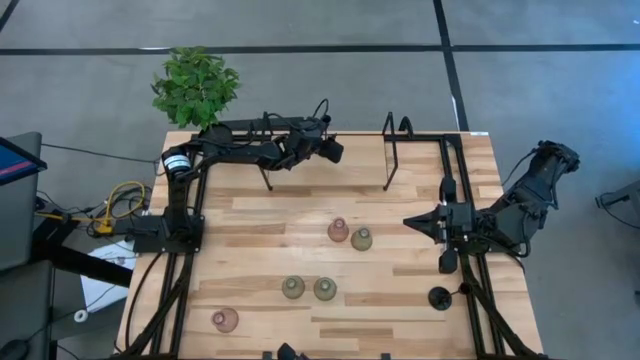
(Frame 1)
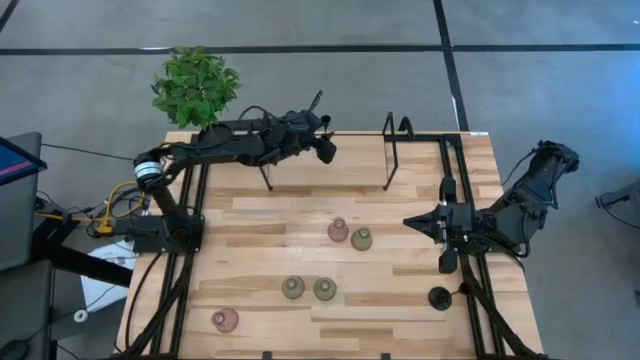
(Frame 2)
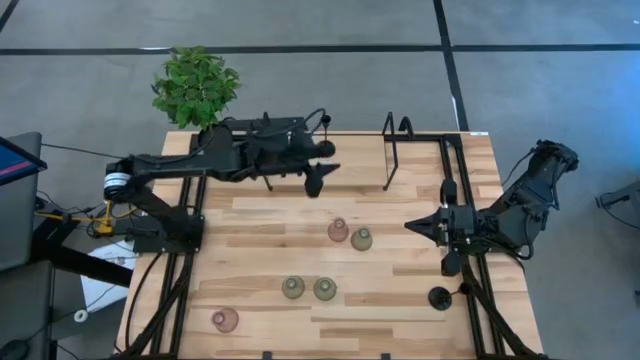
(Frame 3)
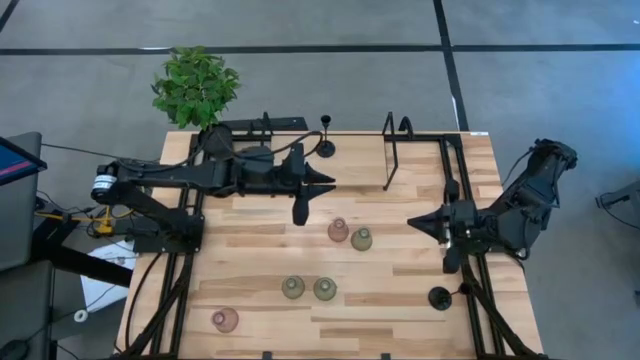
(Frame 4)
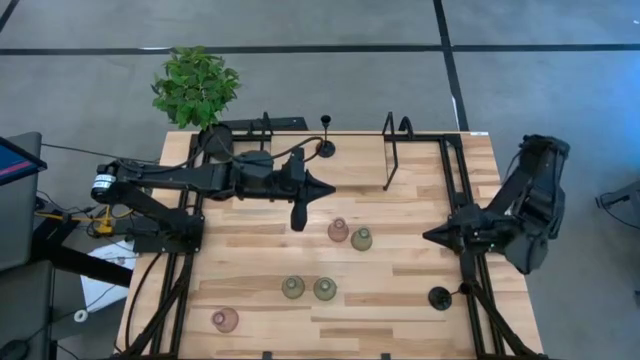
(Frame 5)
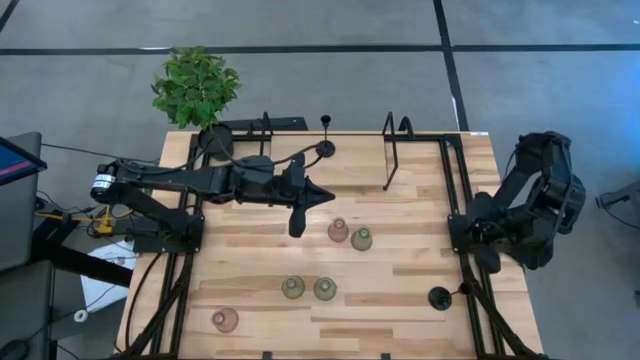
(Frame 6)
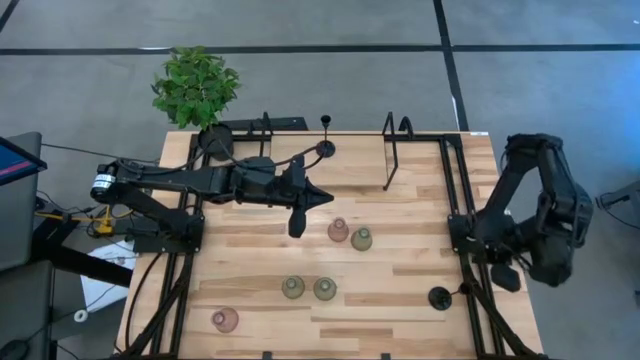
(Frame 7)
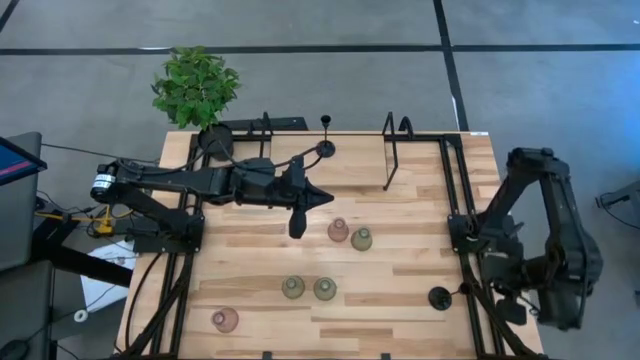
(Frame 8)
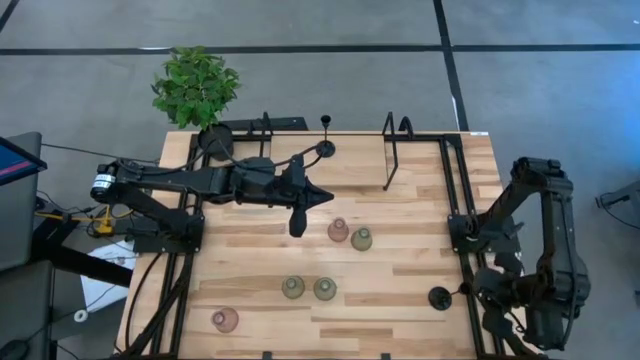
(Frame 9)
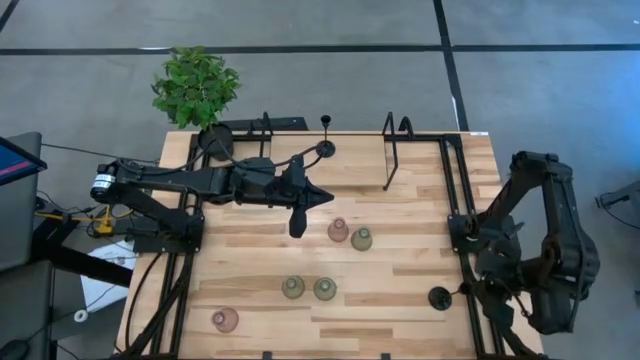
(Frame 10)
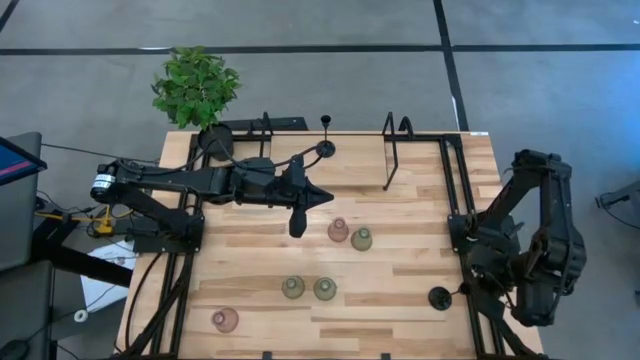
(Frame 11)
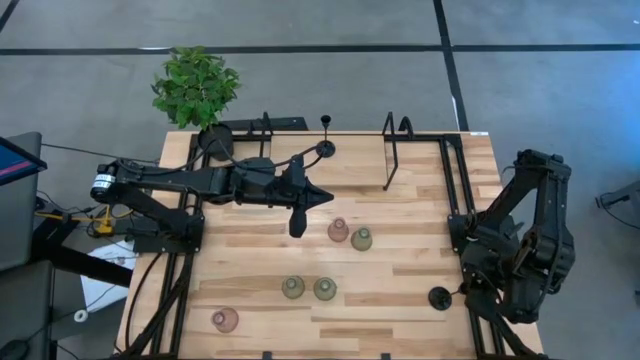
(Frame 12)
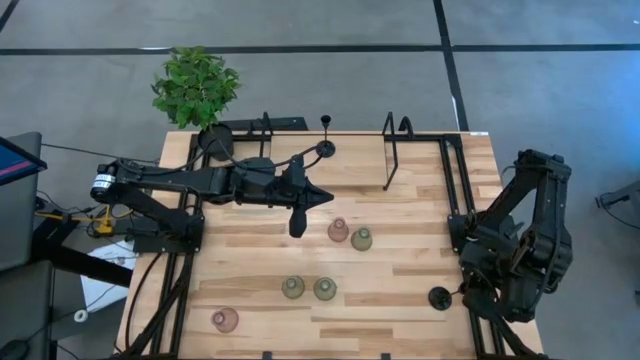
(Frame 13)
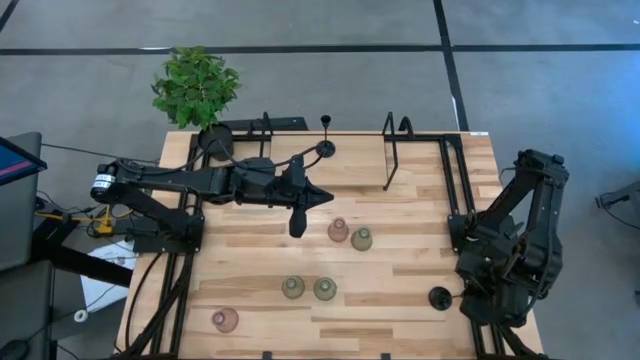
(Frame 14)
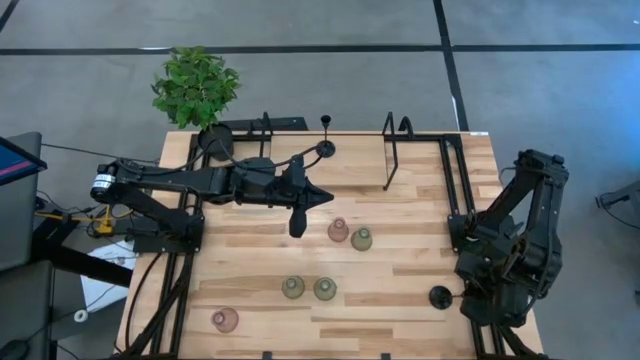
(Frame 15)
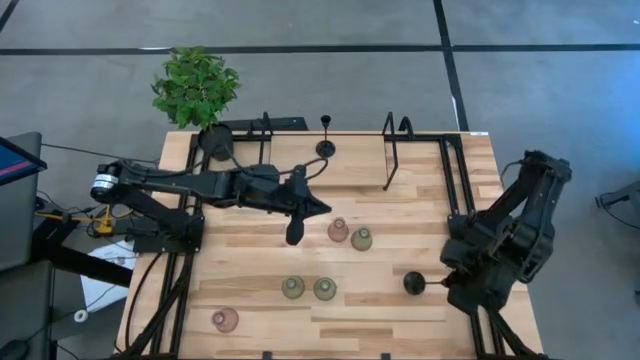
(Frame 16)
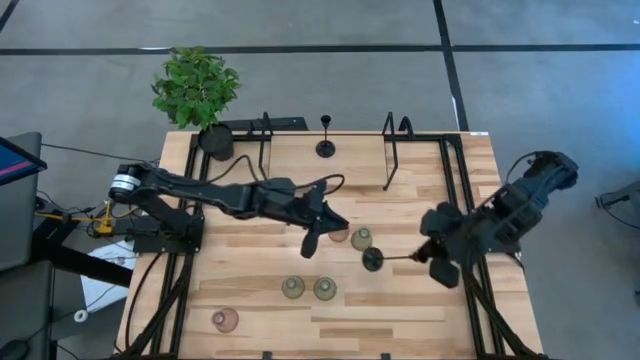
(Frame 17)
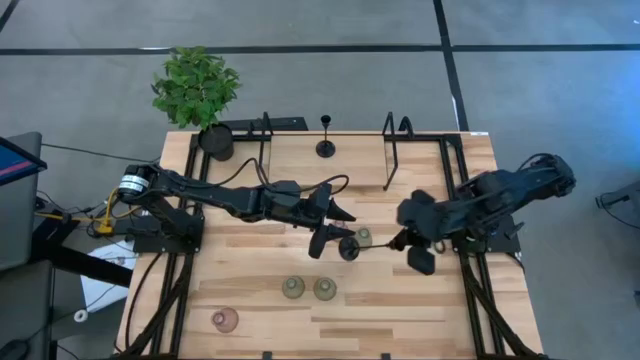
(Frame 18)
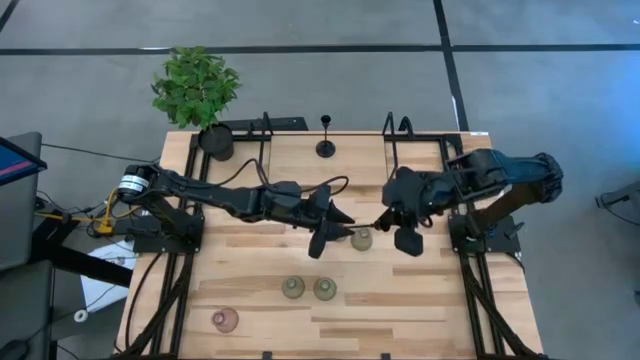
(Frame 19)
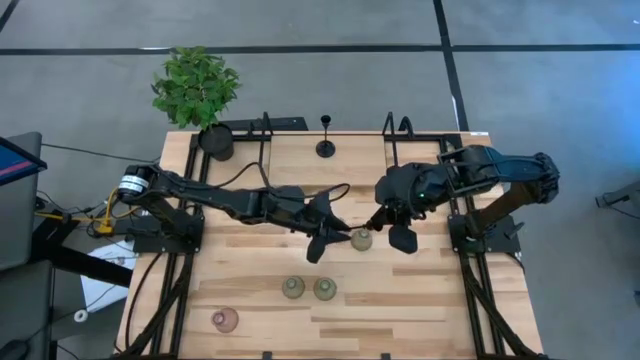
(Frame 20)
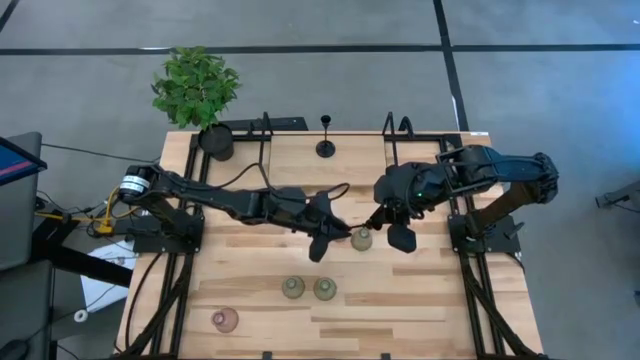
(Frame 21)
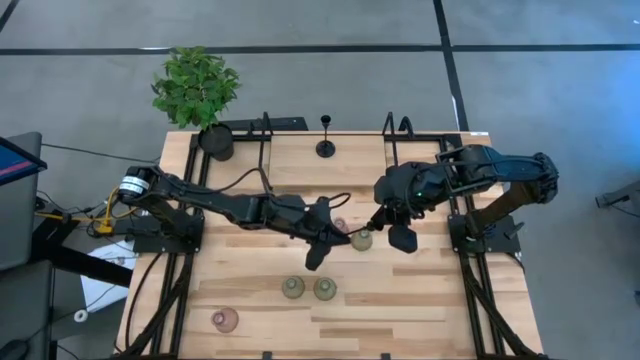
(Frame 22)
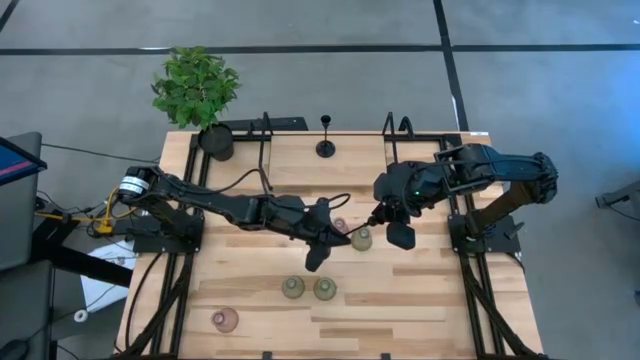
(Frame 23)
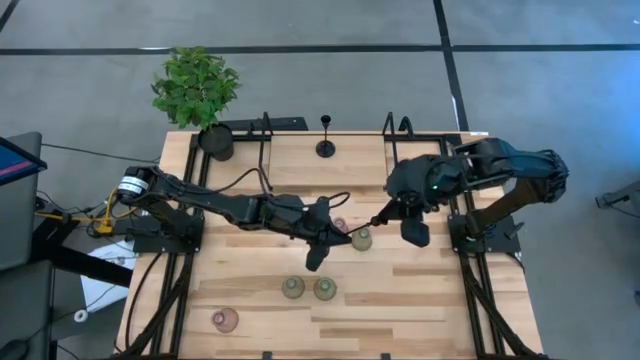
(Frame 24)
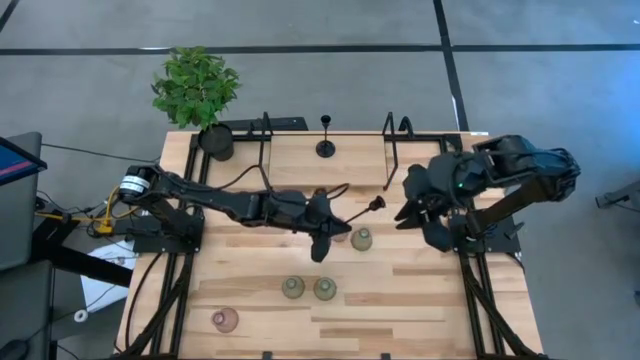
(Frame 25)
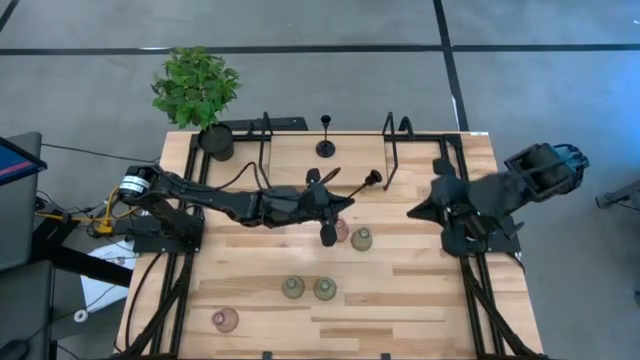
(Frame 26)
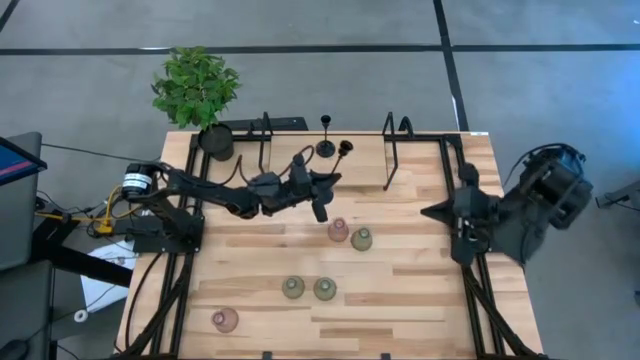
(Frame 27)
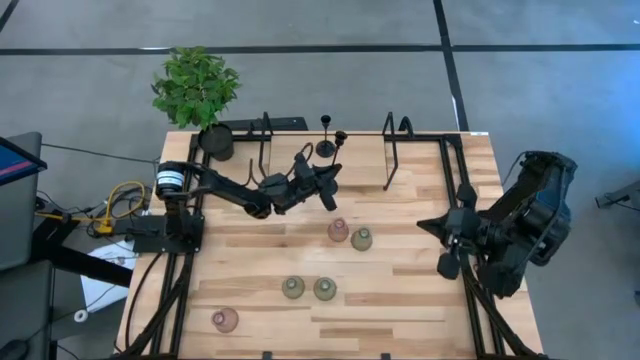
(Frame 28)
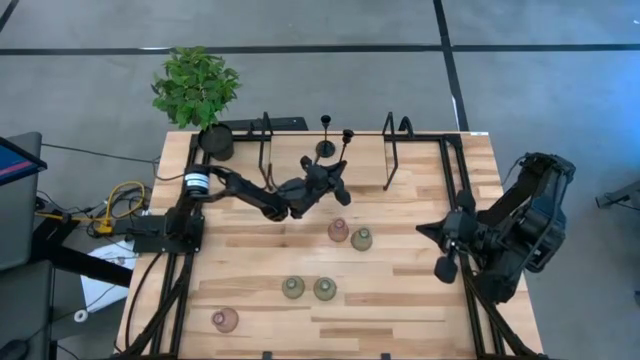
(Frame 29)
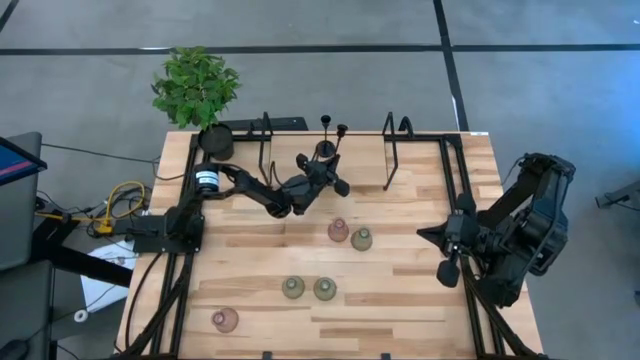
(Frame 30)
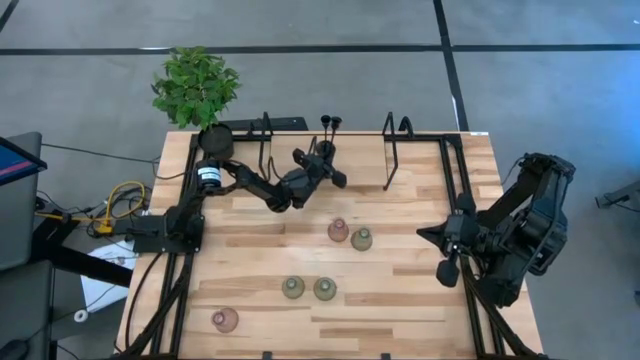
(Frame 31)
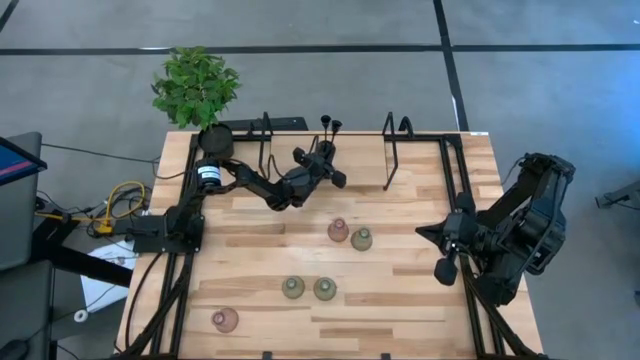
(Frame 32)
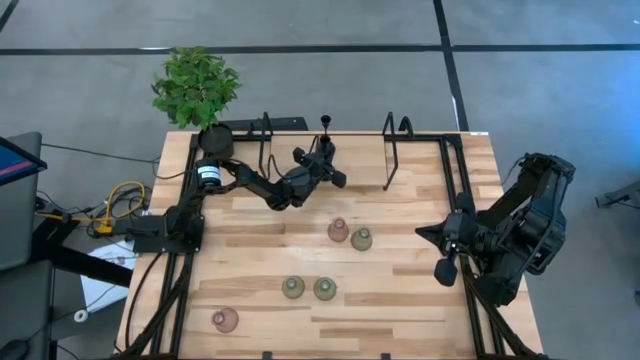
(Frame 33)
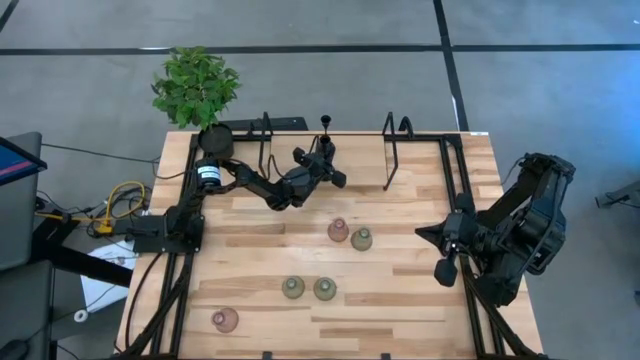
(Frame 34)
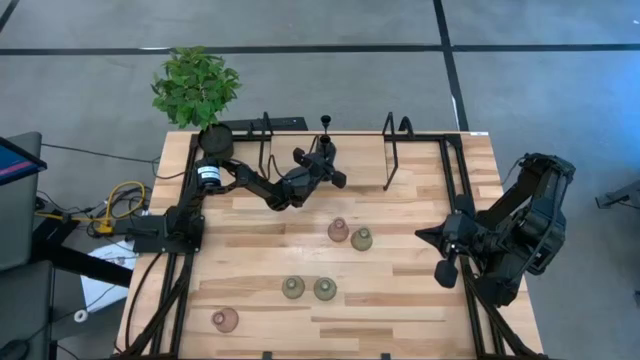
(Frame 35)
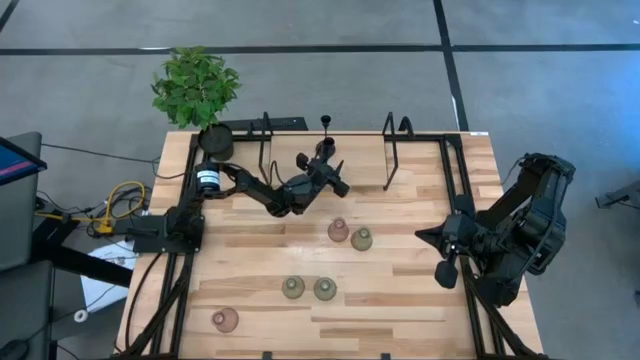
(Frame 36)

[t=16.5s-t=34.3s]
Task: Pick & Place candle stick holders
Put the black candle holder on the shelf aligned with the black candle holder

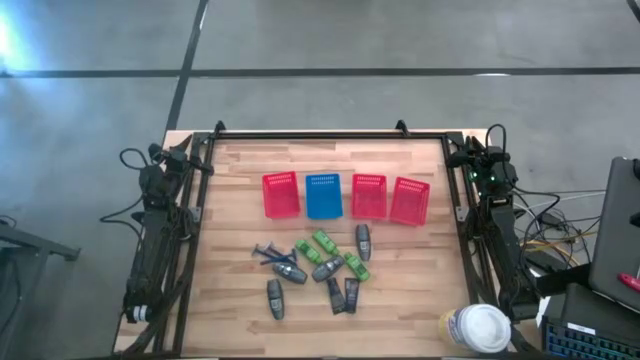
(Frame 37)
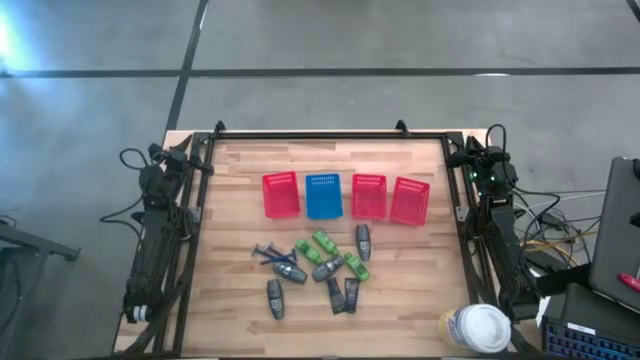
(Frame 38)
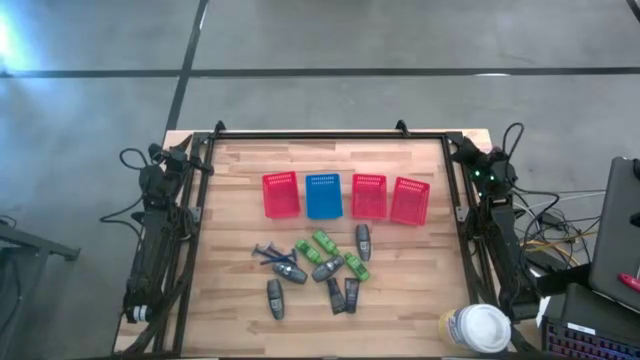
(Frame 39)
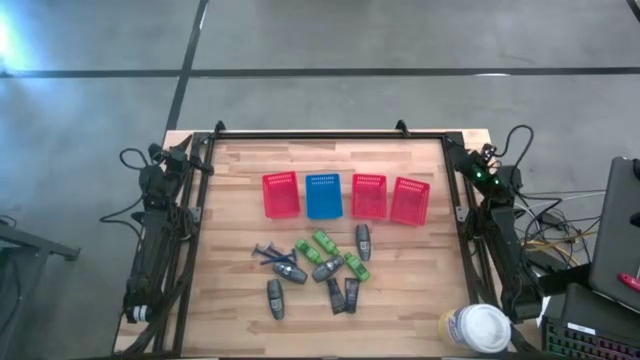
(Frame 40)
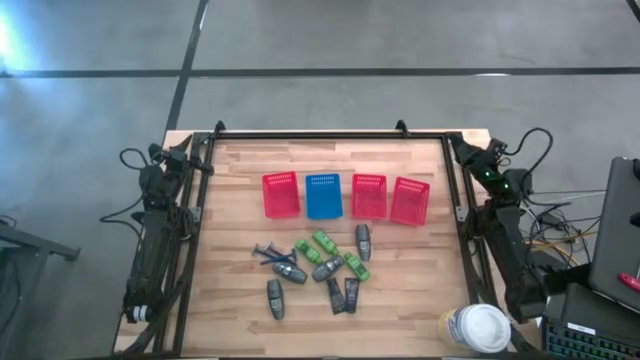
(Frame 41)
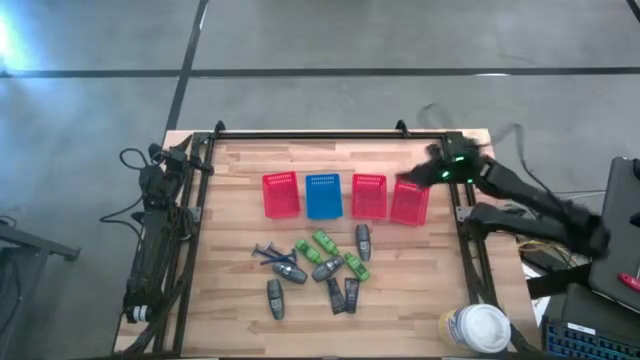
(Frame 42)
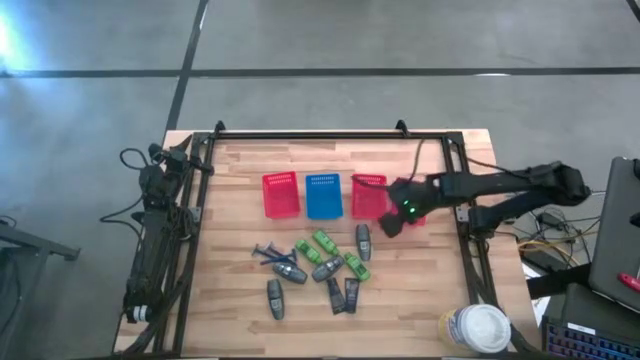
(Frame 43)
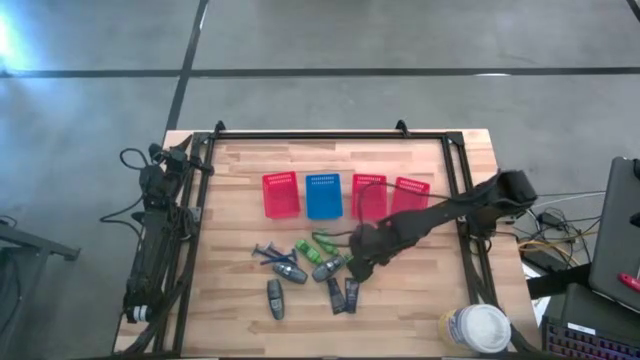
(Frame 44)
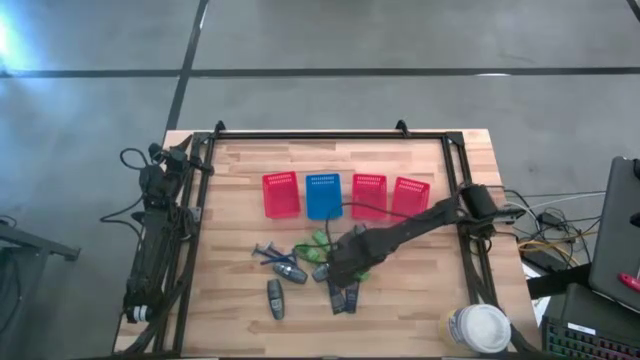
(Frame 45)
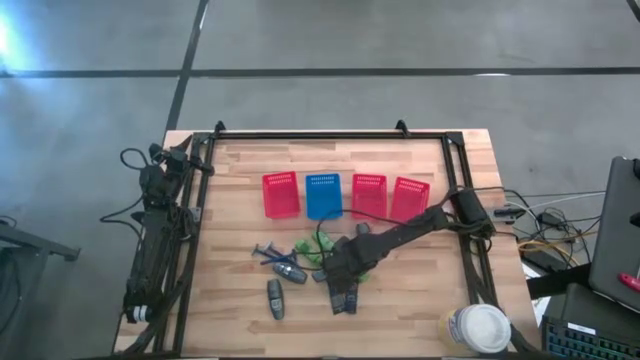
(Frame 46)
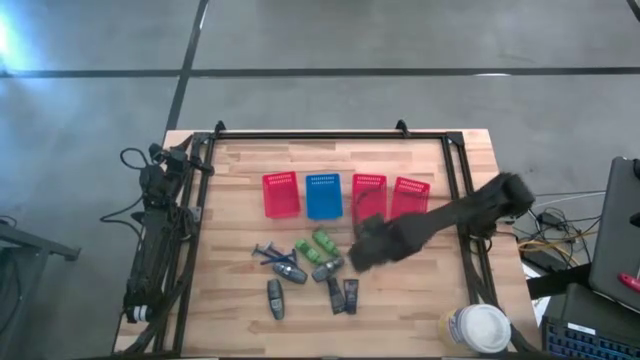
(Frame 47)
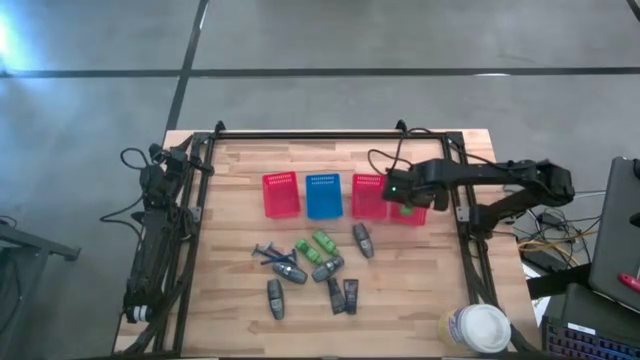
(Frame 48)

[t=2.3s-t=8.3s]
Task: Pick & Place Travel size toiletries
Put the green shampoo into the right red bin
